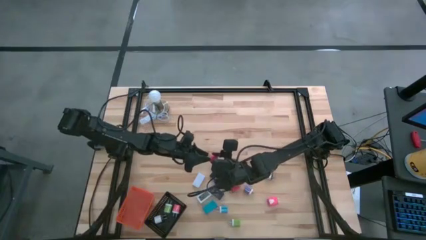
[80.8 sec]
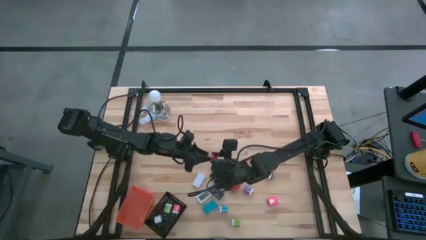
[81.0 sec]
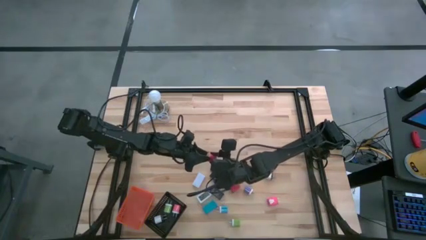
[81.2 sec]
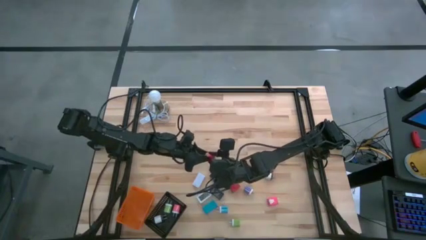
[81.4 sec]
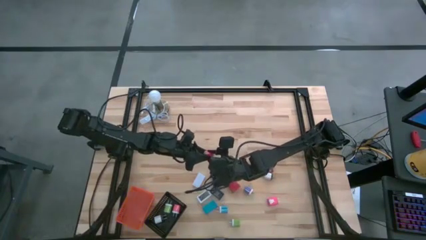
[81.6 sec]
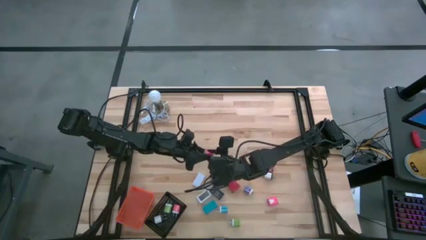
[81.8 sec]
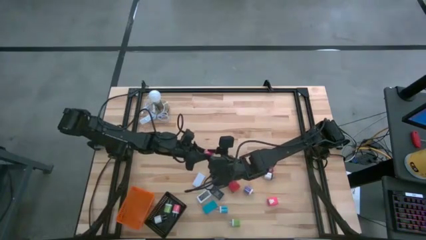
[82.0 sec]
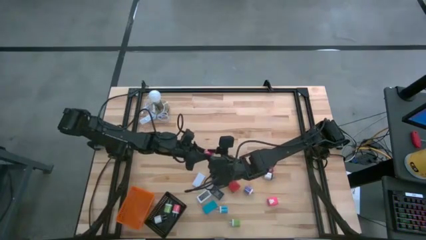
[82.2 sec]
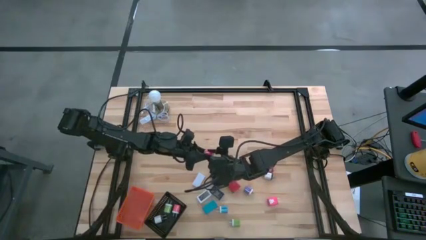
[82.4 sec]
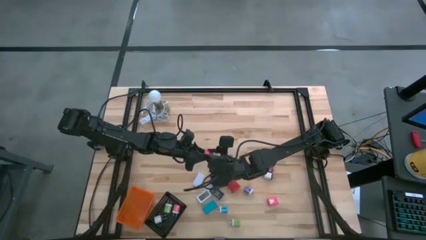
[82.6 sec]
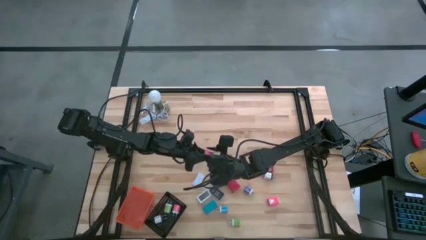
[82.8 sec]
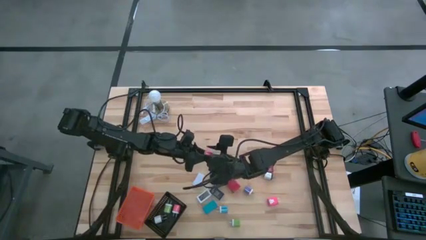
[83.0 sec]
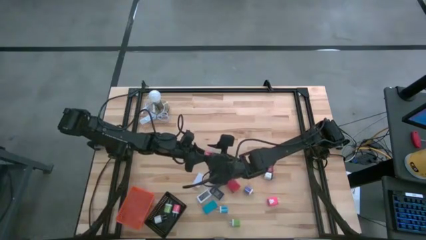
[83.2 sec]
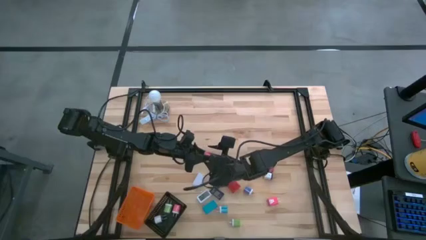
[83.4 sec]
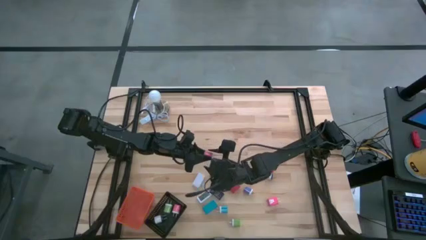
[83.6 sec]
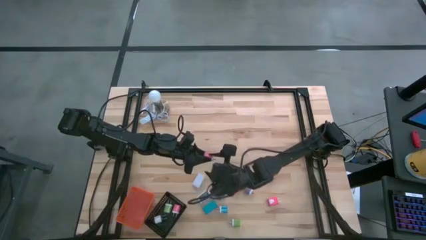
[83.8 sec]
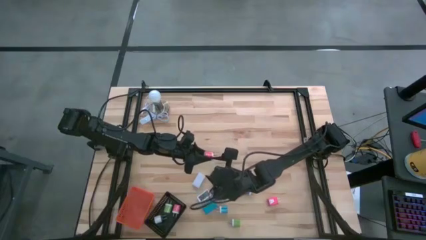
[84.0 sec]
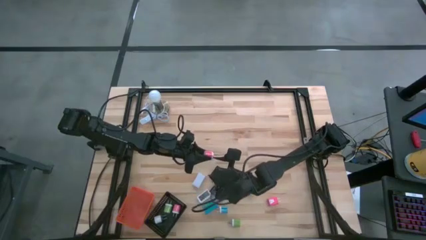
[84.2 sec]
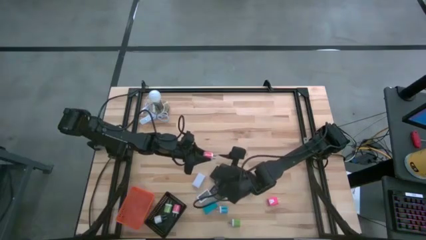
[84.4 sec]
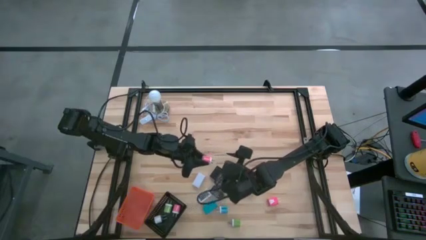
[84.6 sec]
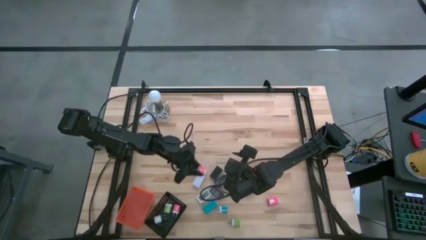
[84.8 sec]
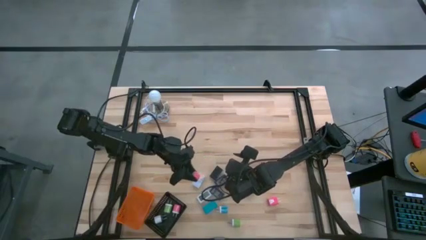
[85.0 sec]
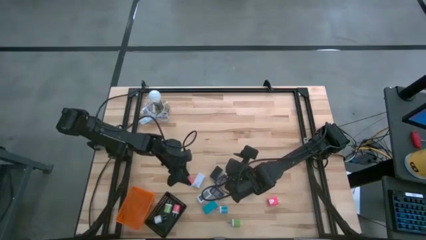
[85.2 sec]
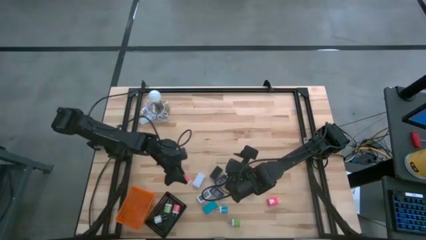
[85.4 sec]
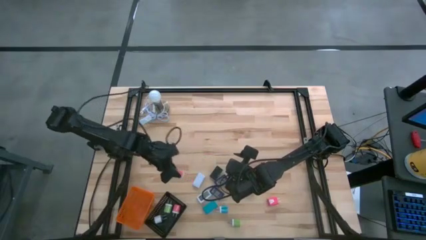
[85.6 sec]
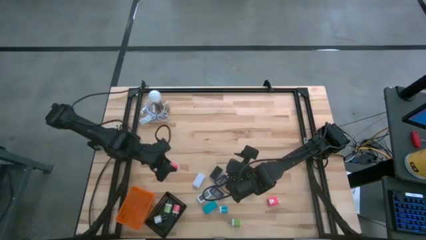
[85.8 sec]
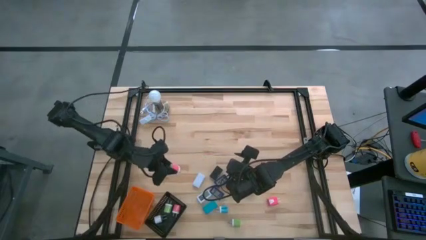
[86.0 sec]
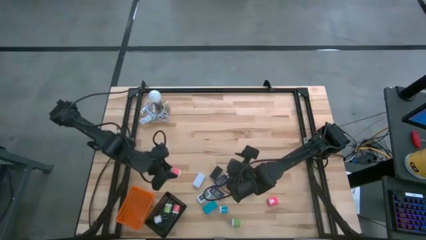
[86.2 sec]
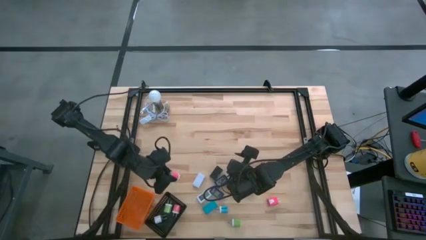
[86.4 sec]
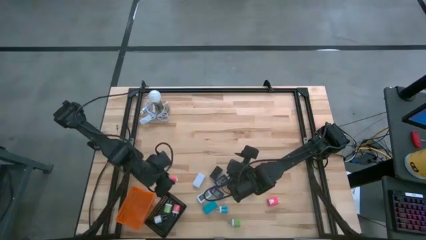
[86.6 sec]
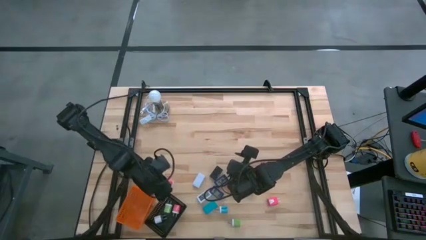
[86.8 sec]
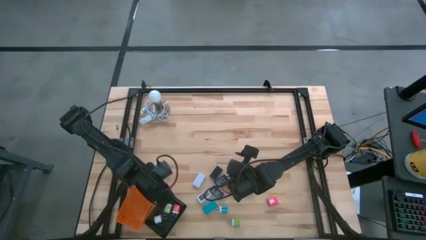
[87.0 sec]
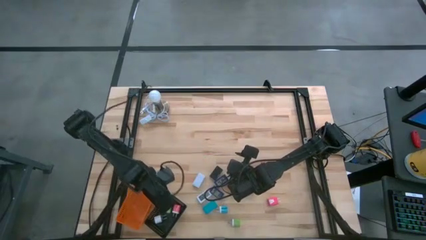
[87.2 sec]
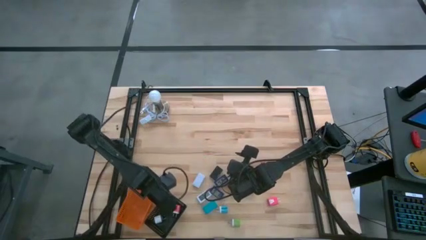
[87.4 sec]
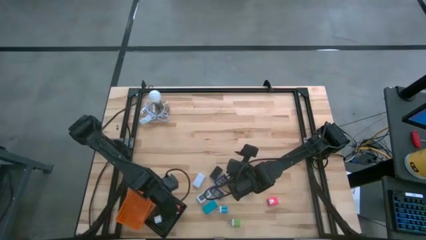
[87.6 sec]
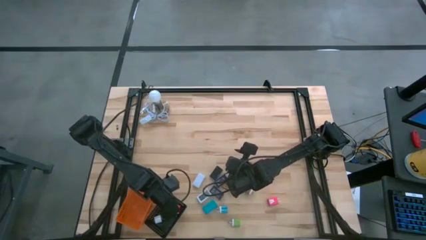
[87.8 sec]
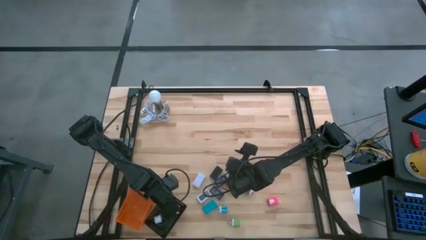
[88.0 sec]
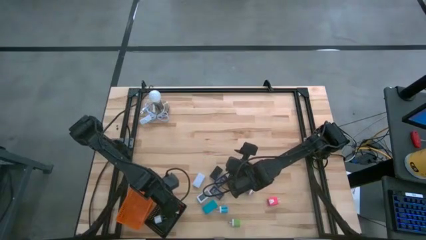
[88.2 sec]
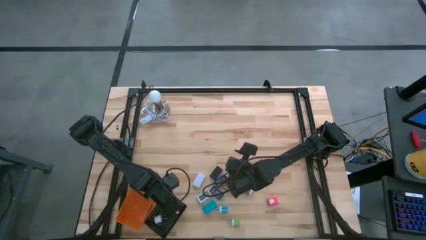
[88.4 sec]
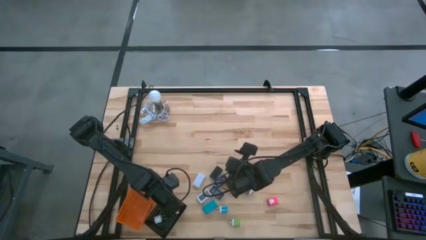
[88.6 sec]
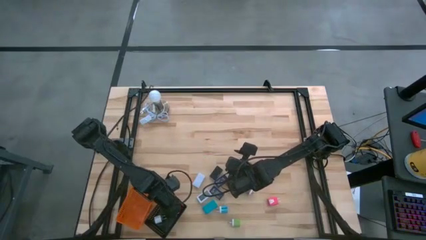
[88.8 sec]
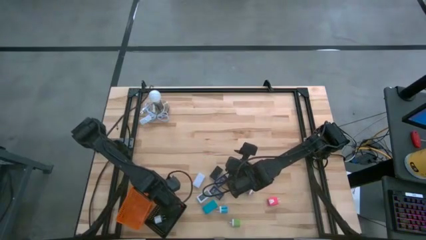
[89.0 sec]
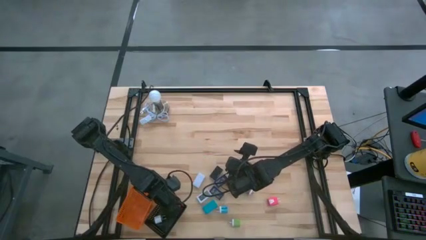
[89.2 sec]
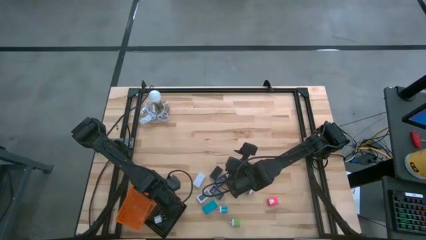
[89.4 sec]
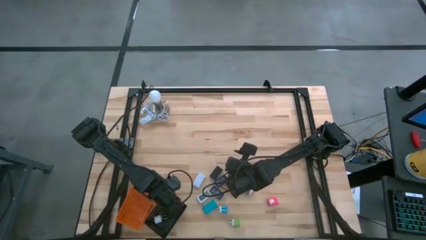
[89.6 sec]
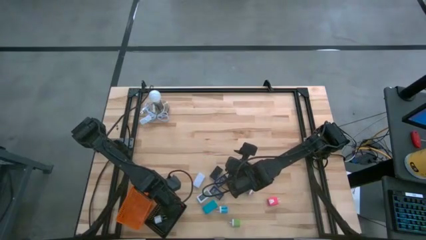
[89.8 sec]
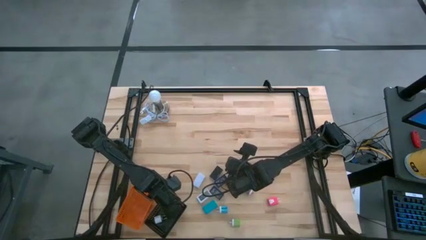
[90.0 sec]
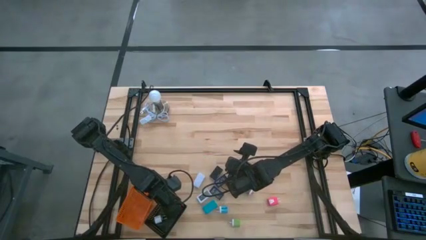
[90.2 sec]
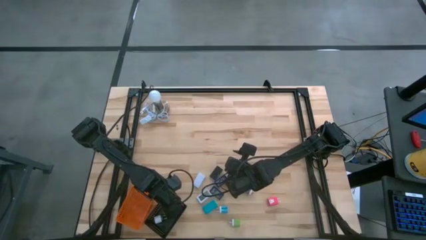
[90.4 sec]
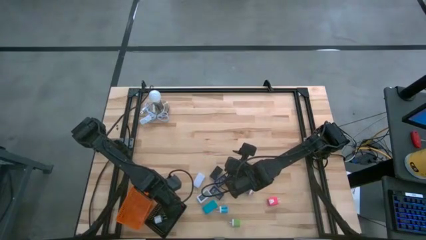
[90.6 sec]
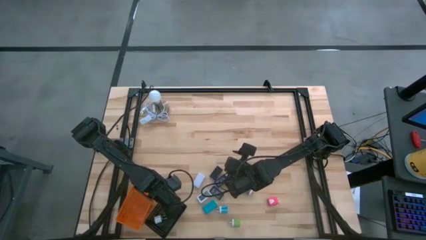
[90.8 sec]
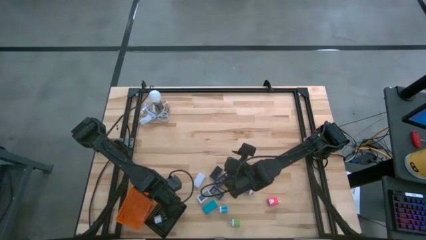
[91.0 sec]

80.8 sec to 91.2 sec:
Task: Pick & Place Office items
Put the pink white charger adapter into the black basket
